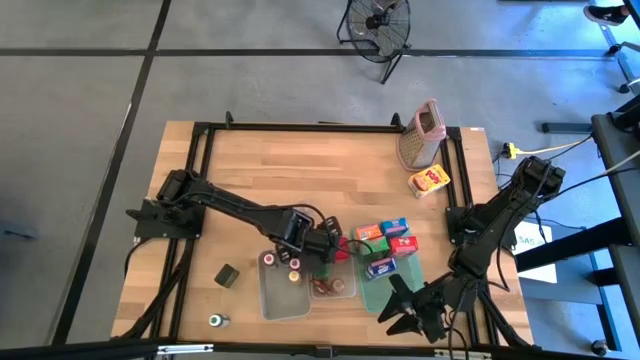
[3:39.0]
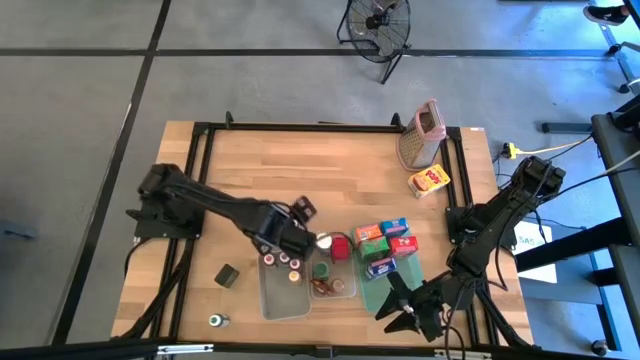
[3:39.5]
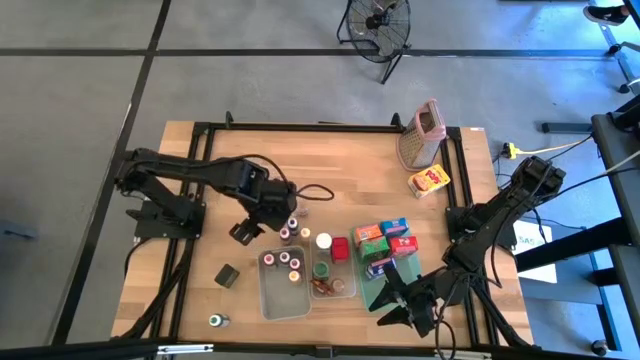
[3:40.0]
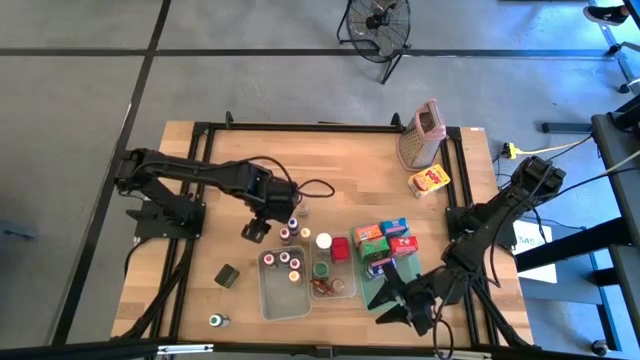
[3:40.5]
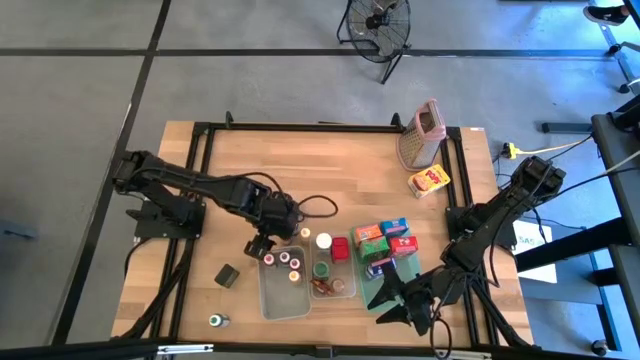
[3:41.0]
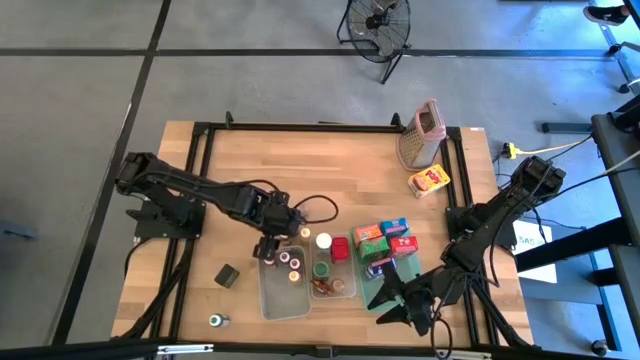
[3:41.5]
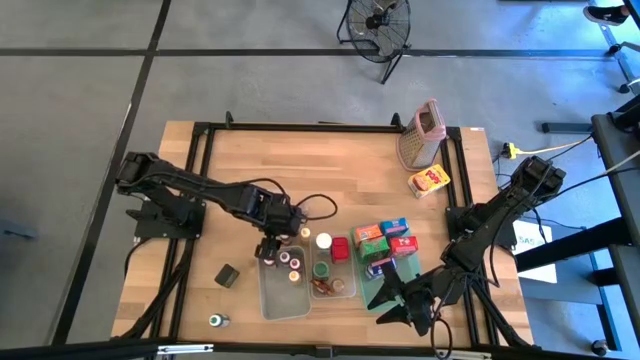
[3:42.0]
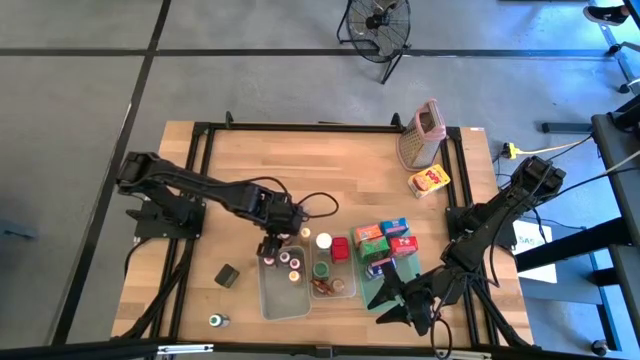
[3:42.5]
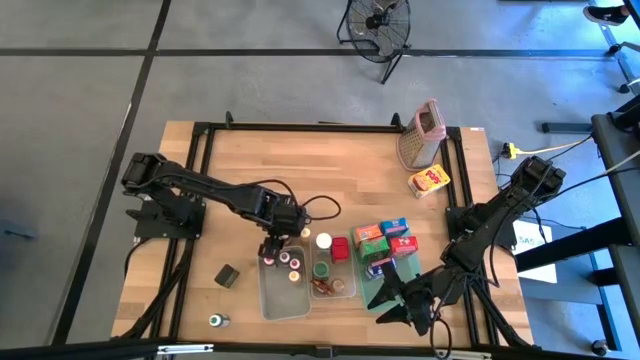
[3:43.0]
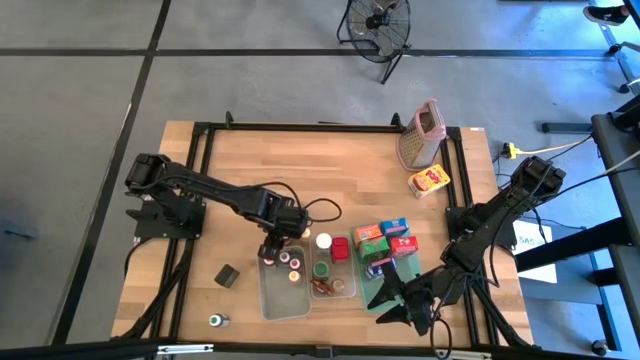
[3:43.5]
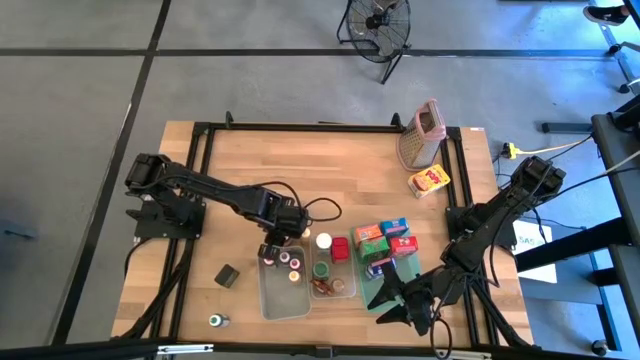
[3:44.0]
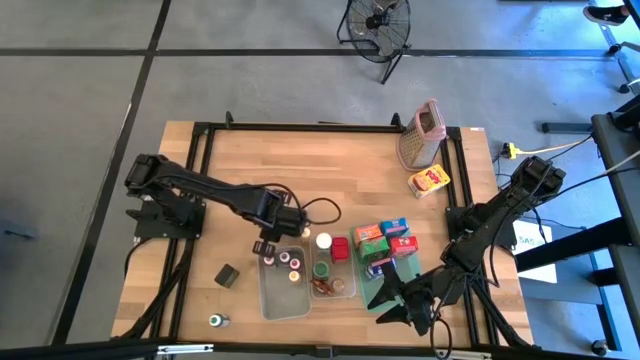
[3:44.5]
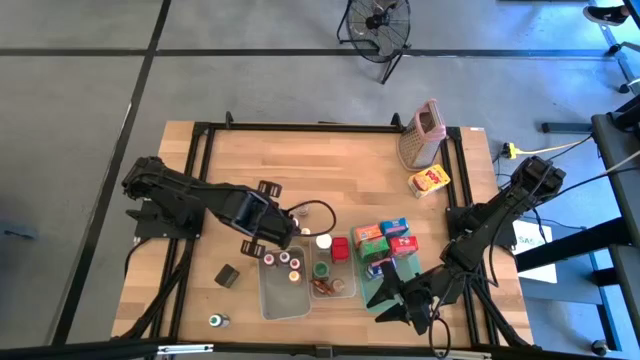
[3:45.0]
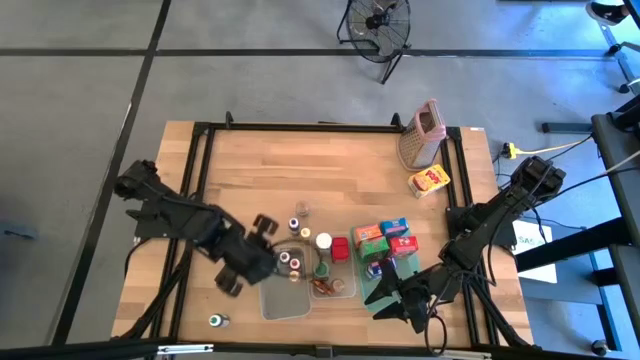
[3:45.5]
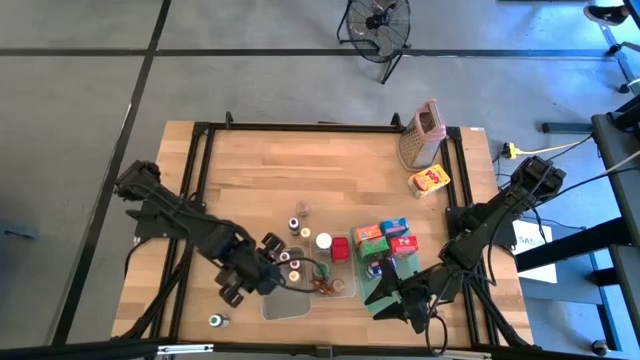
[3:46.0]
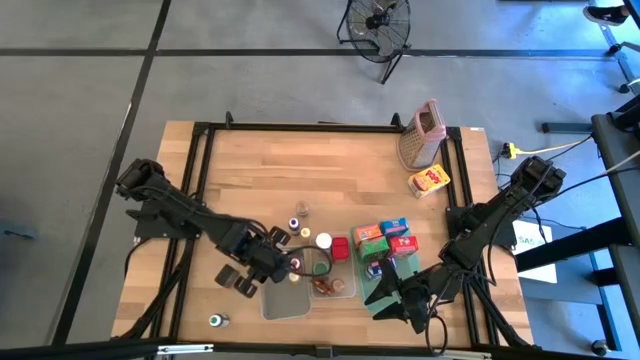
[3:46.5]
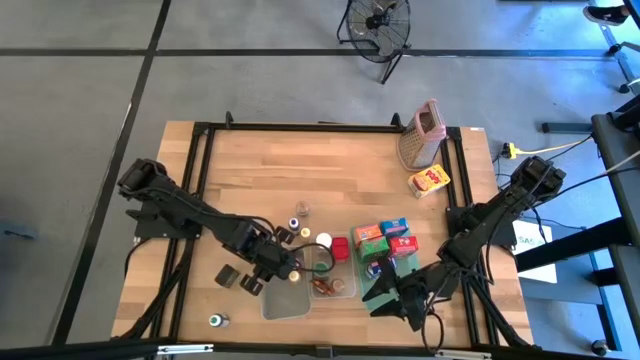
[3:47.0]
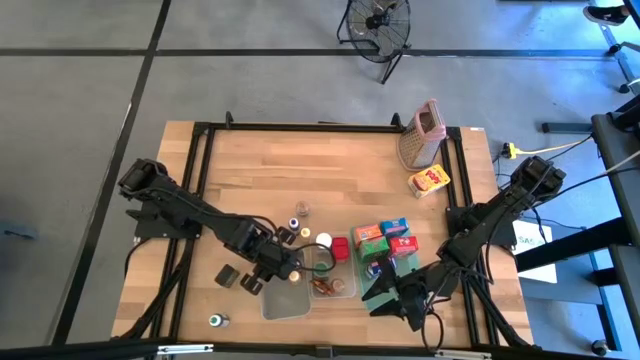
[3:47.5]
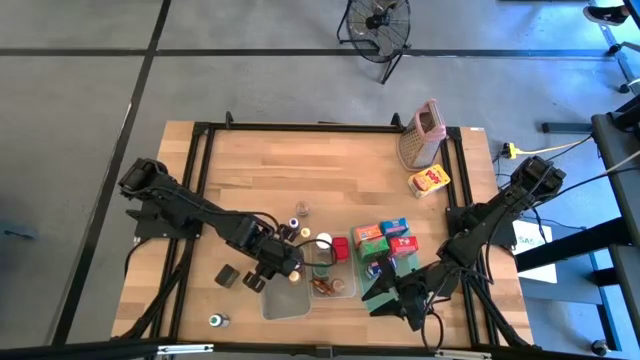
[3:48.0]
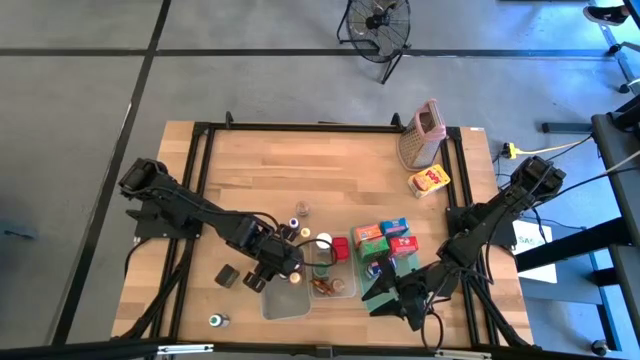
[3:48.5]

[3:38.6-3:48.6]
Task: Pick & Place Kitchen Items
Put the red food coloring bottle into the gray bin

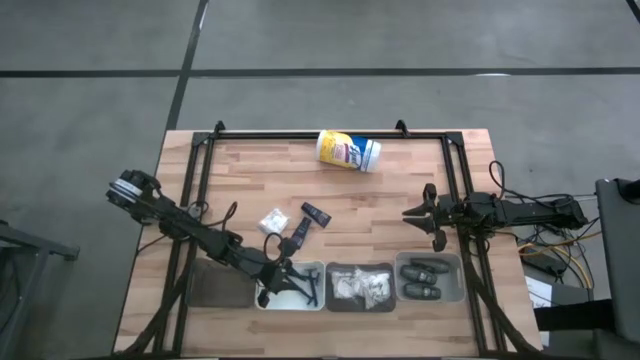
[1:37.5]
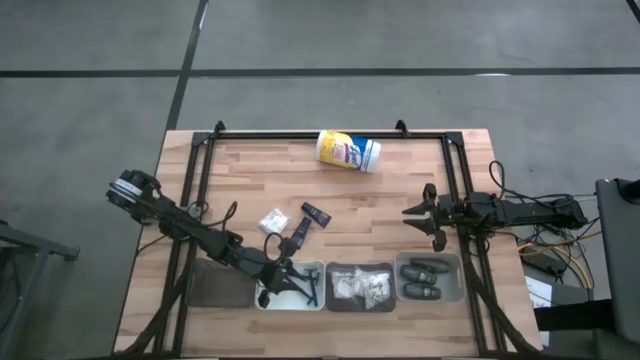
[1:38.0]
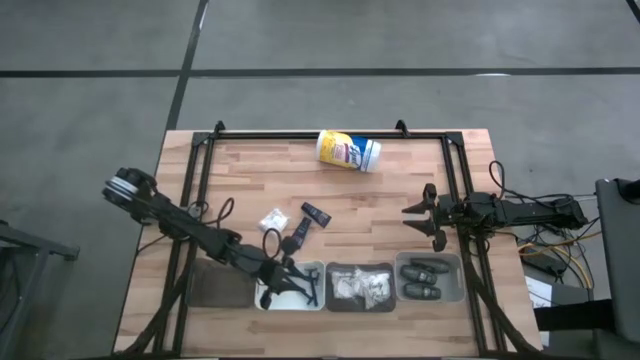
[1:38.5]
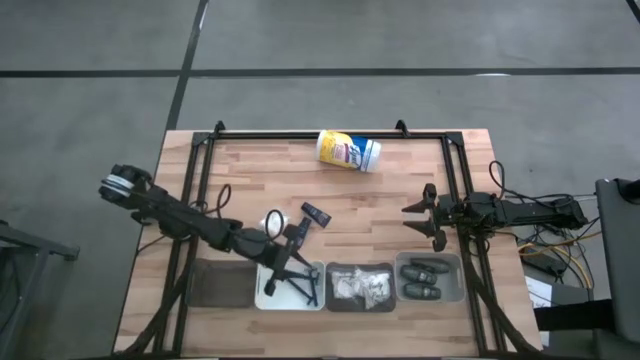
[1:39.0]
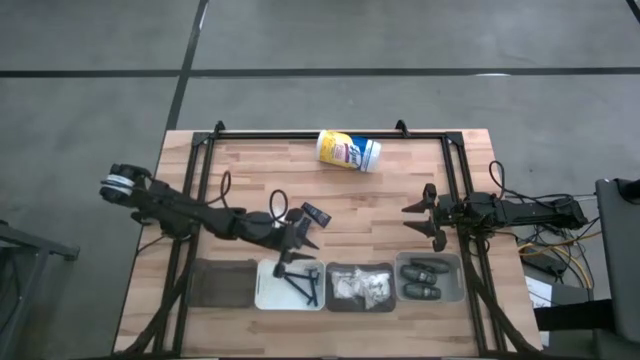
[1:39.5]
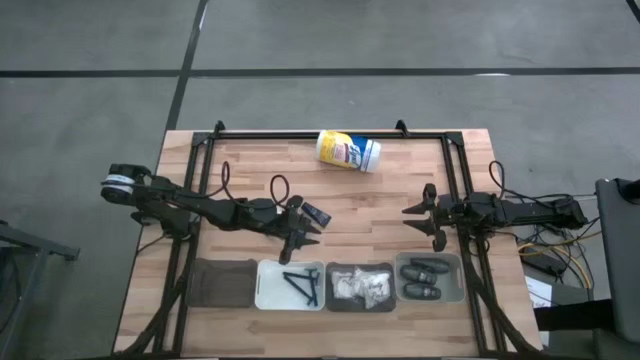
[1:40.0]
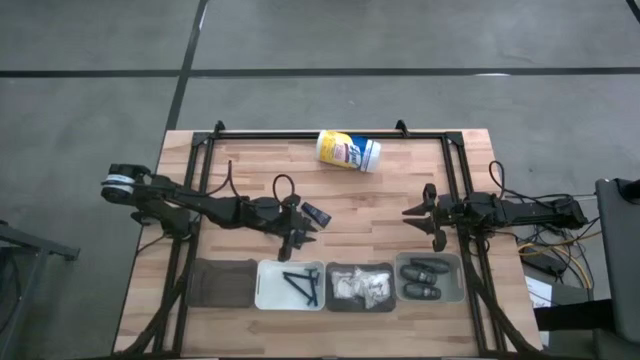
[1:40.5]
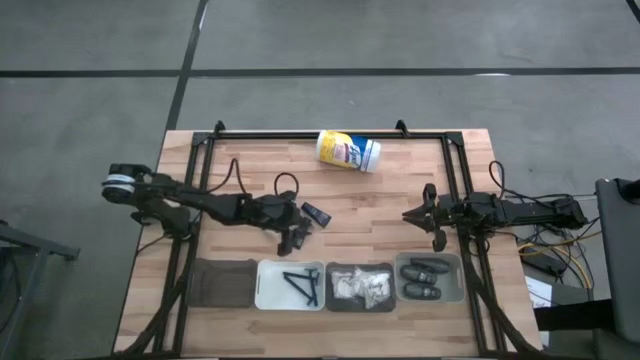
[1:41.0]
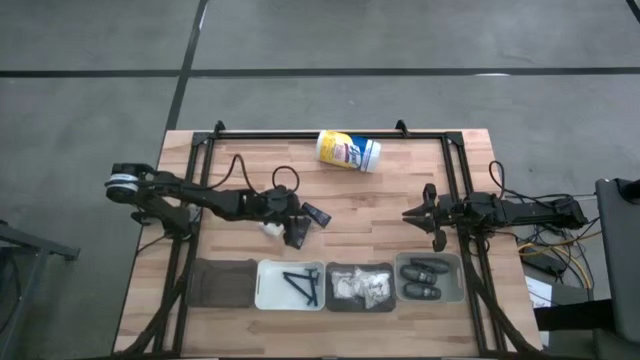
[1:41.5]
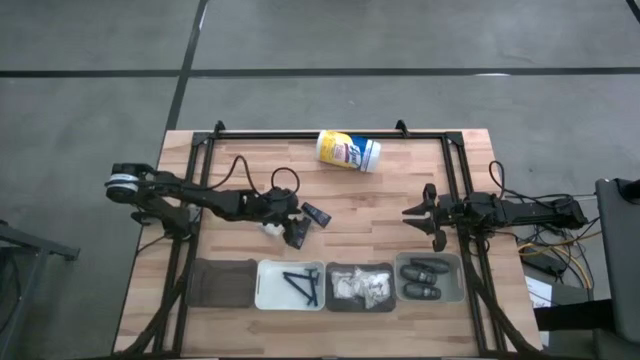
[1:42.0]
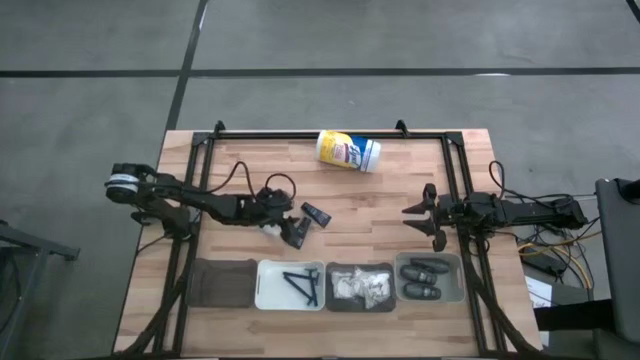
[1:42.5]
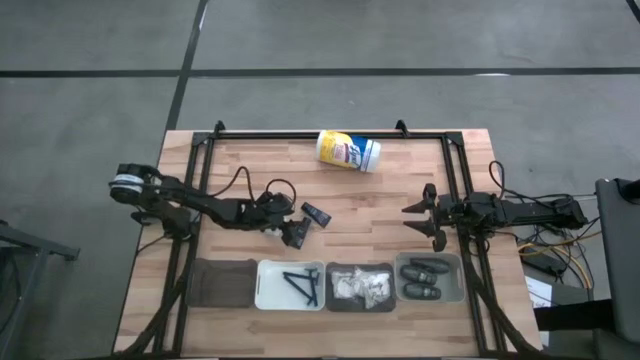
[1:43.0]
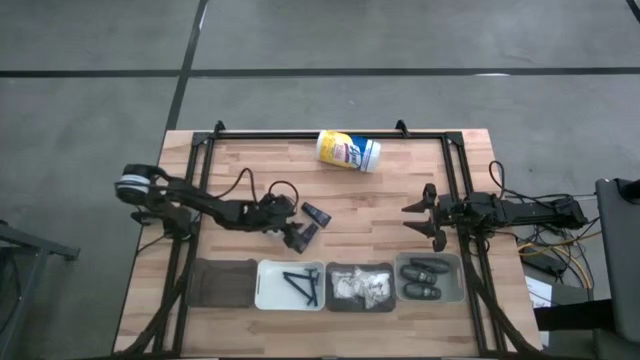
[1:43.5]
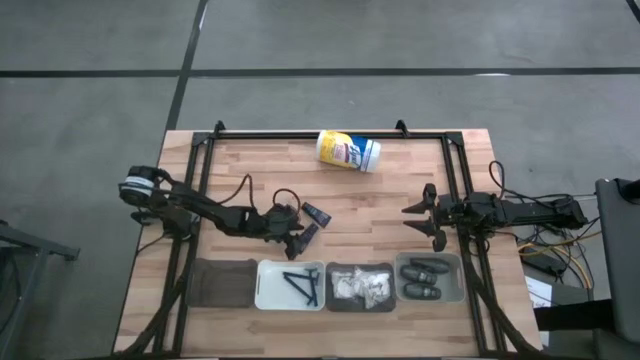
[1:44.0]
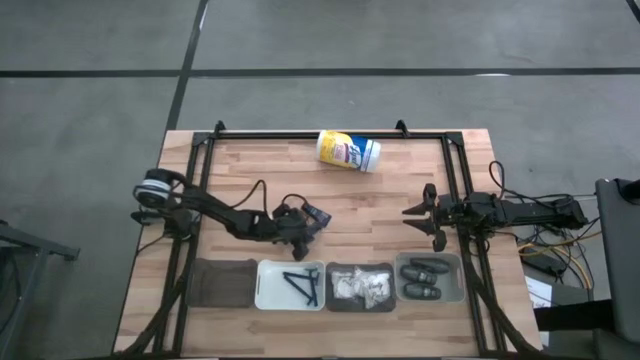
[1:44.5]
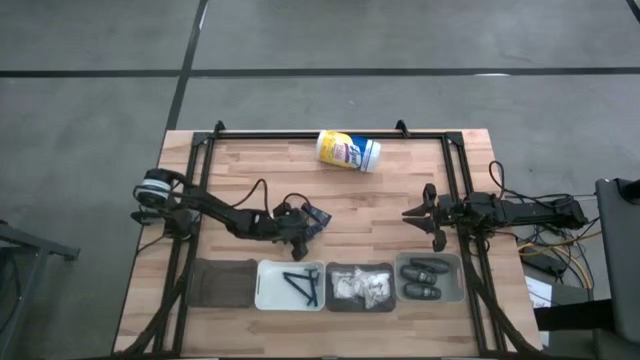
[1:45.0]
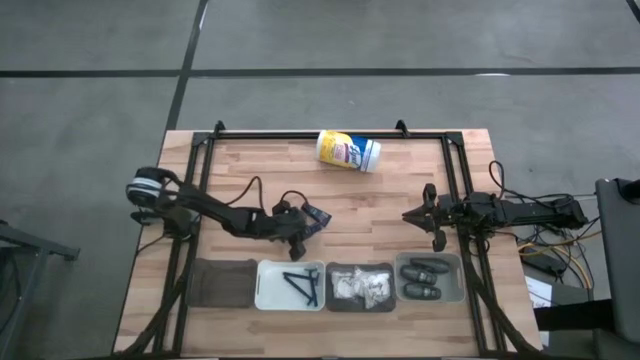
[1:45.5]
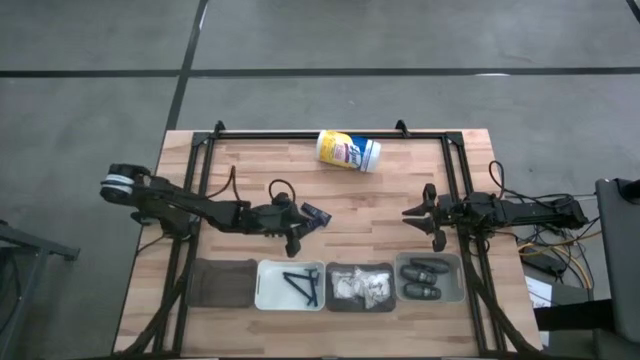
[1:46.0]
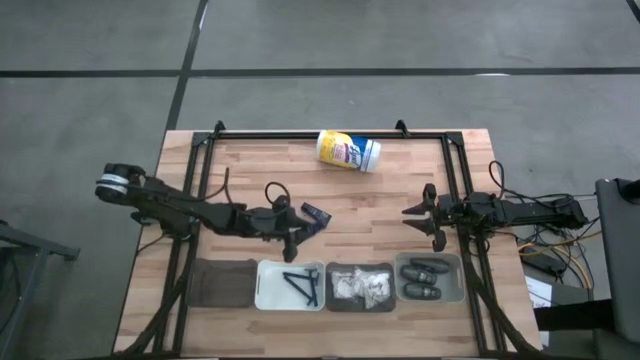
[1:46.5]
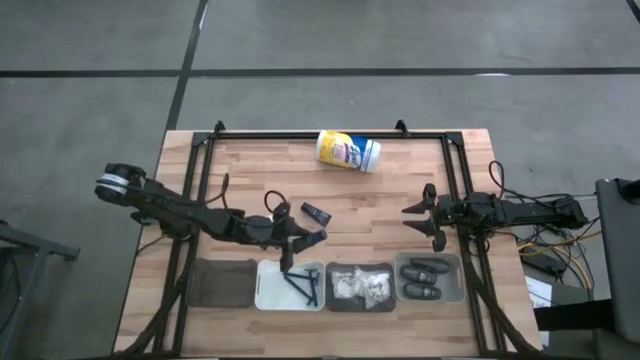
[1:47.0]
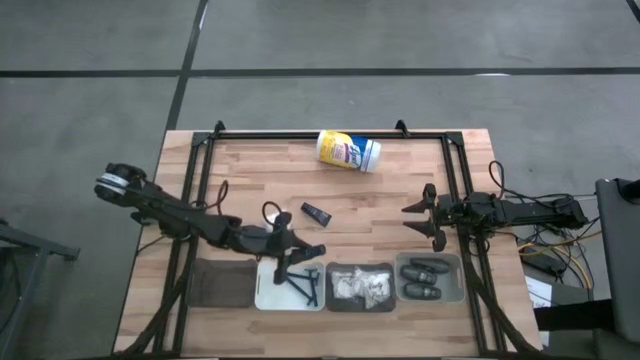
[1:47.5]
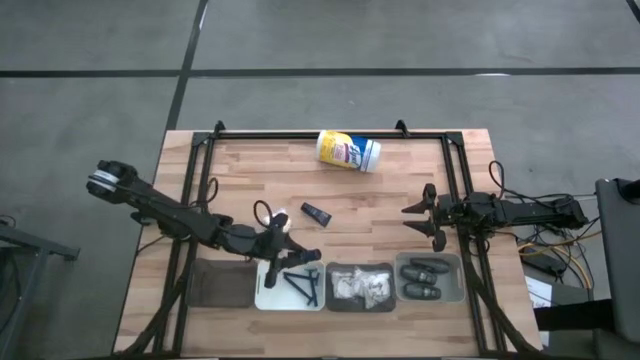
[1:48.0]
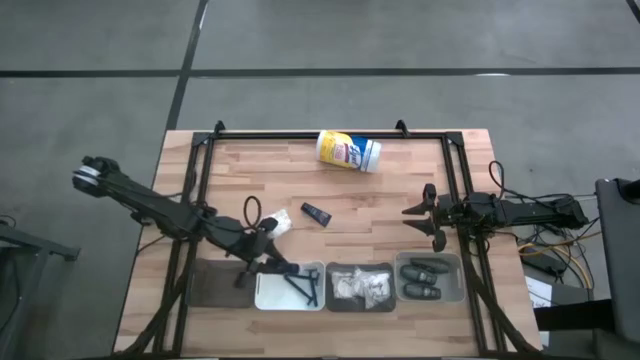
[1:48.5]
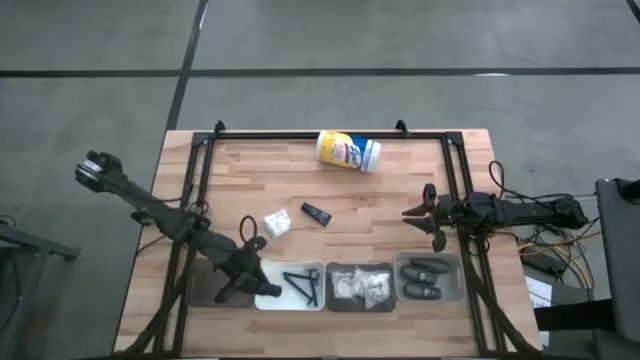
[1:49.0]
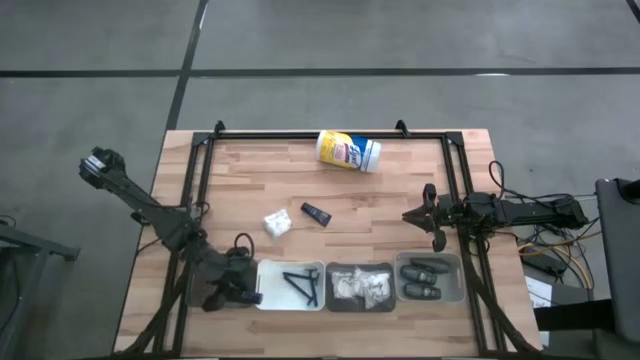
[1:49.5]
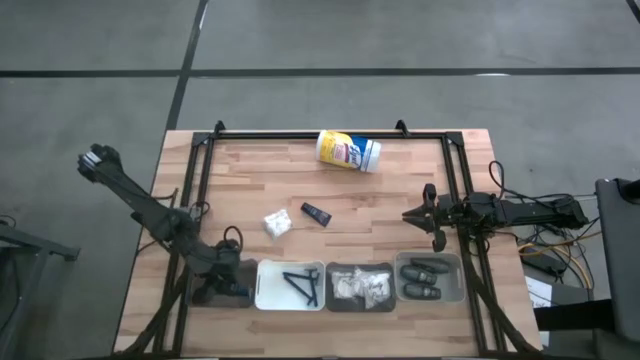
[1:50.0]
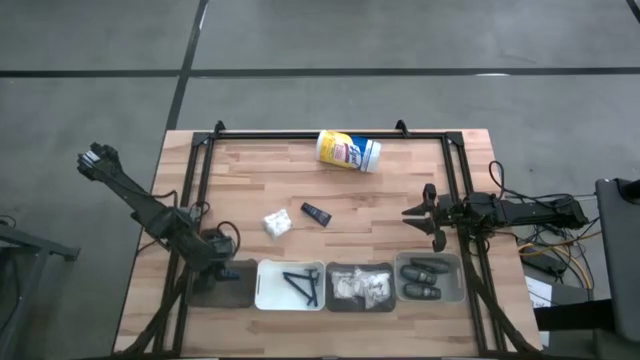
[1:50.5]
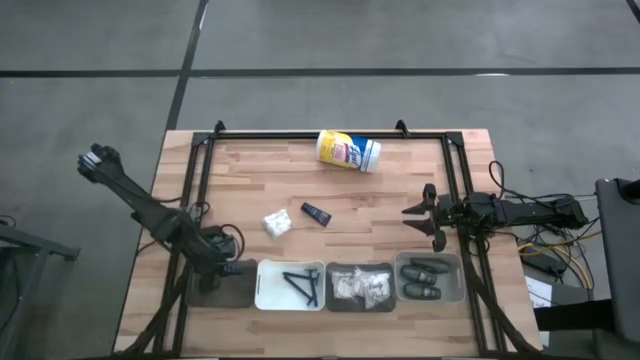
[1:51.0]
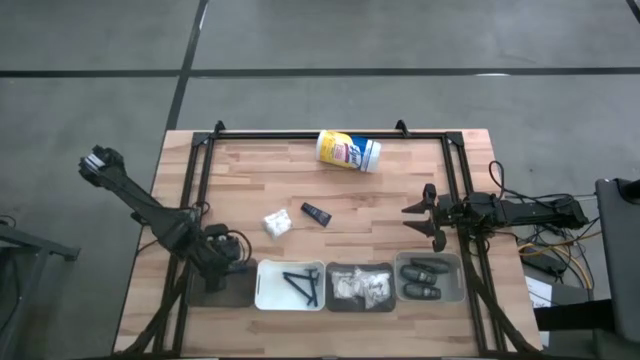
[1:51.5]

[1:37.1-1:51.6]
Task: Pick & Place Travel size toiletries
Put the dark blue shave cream into the left black bin
